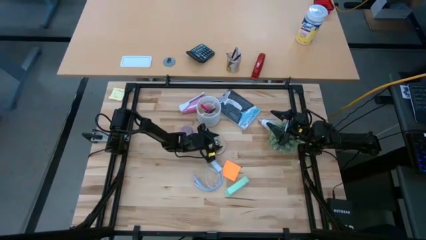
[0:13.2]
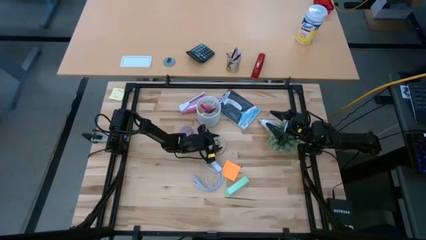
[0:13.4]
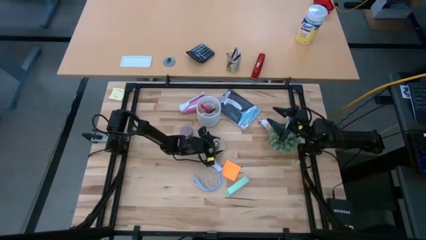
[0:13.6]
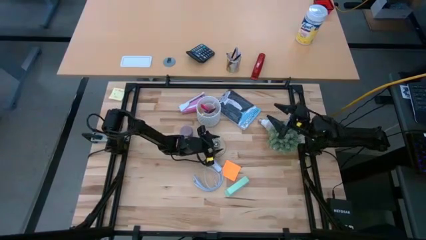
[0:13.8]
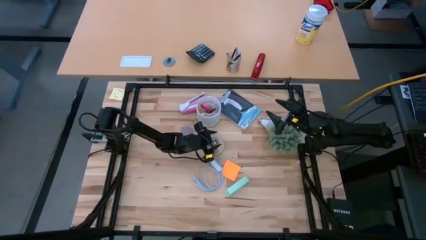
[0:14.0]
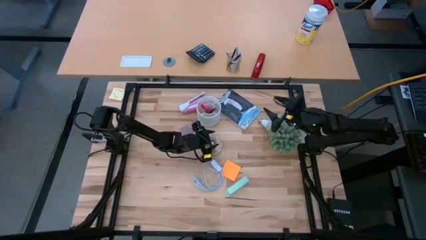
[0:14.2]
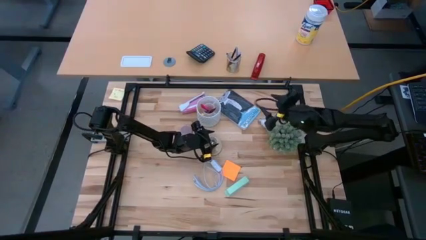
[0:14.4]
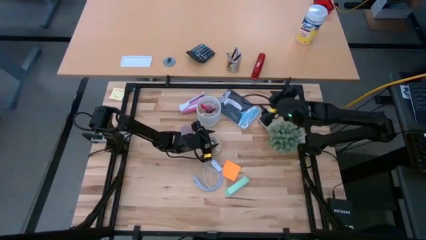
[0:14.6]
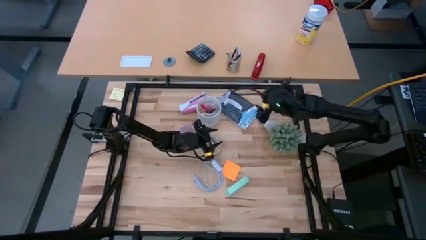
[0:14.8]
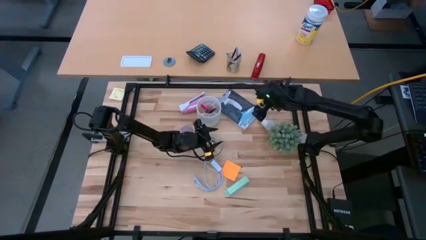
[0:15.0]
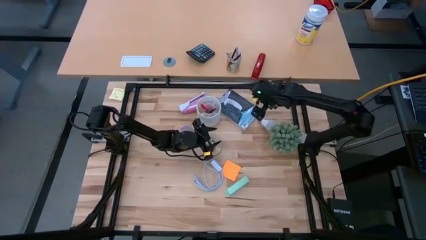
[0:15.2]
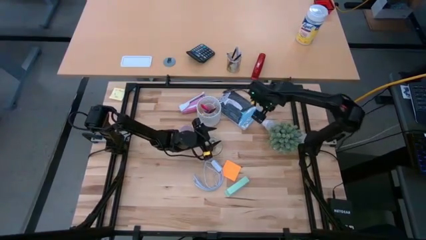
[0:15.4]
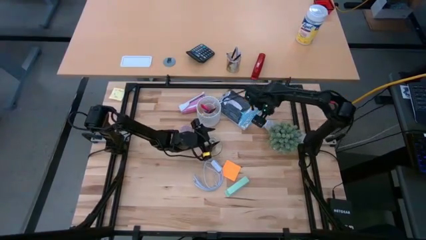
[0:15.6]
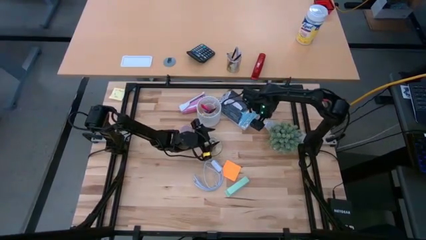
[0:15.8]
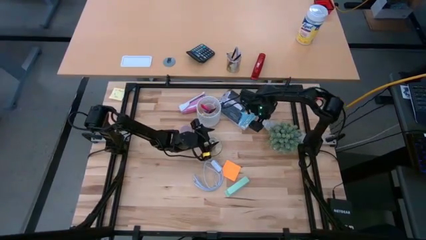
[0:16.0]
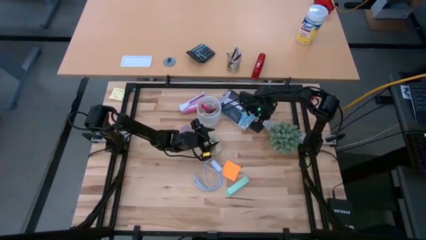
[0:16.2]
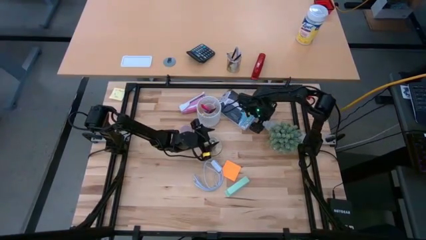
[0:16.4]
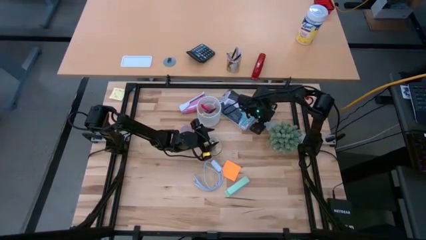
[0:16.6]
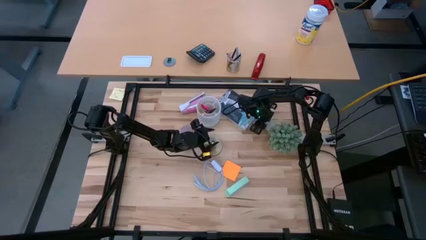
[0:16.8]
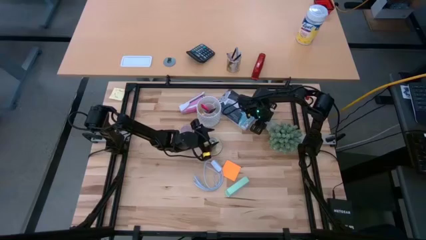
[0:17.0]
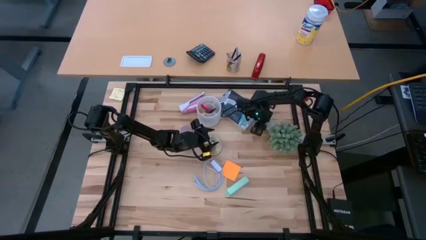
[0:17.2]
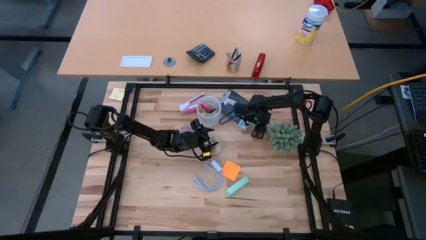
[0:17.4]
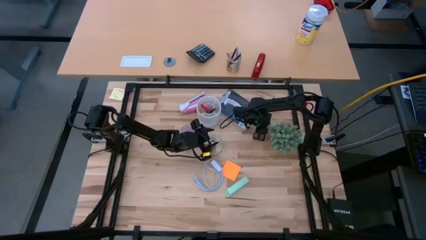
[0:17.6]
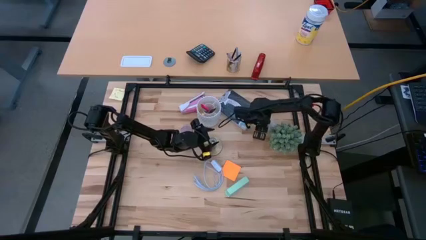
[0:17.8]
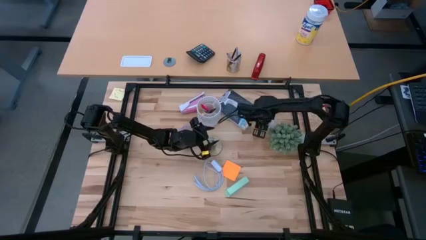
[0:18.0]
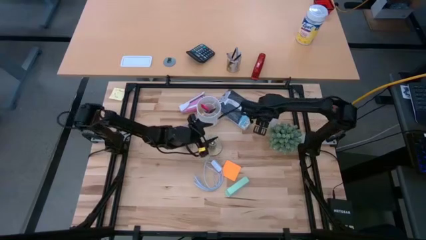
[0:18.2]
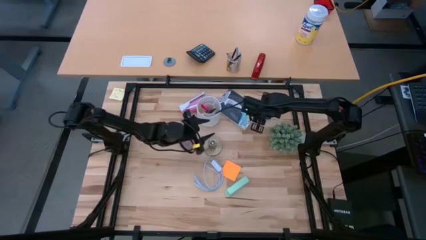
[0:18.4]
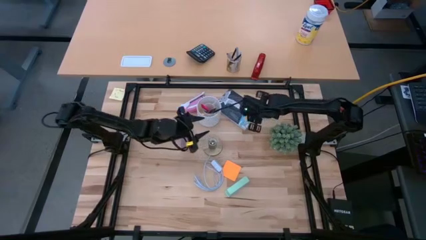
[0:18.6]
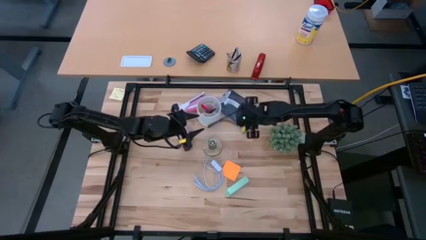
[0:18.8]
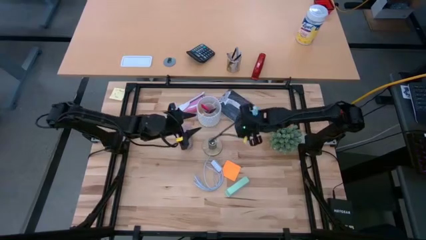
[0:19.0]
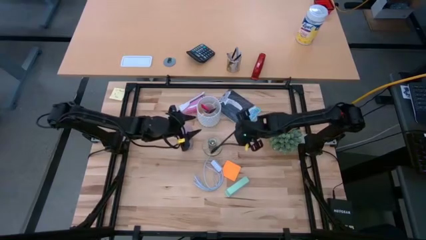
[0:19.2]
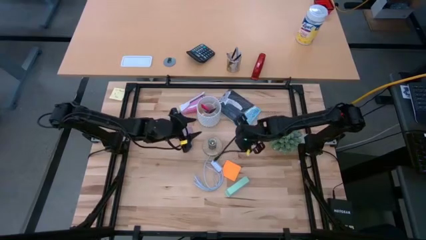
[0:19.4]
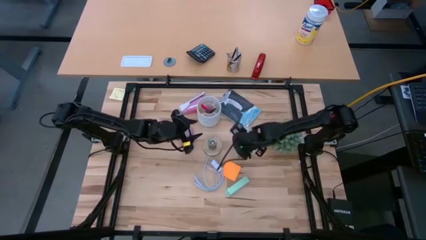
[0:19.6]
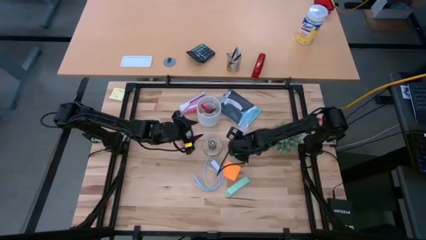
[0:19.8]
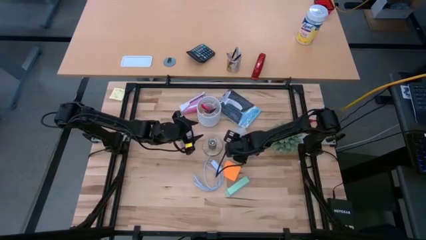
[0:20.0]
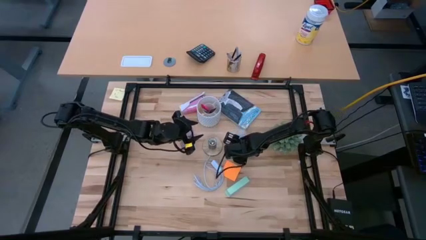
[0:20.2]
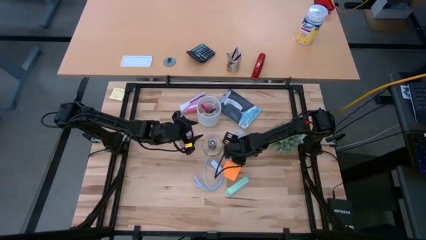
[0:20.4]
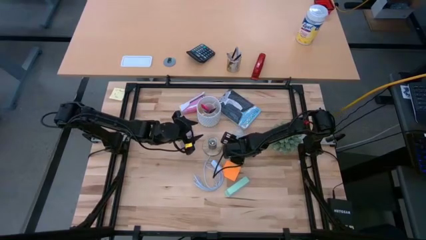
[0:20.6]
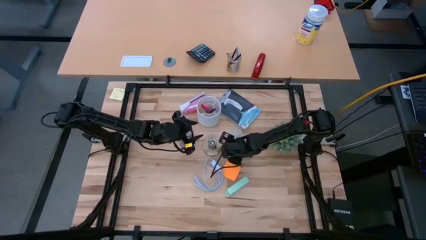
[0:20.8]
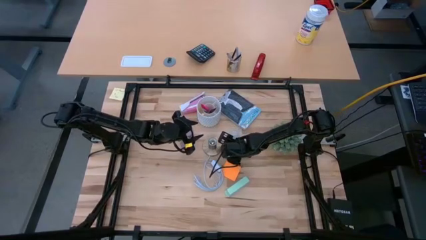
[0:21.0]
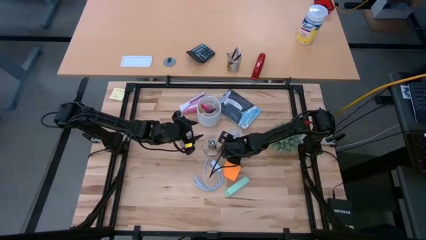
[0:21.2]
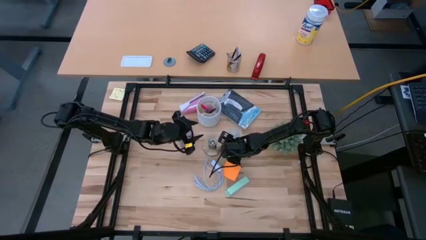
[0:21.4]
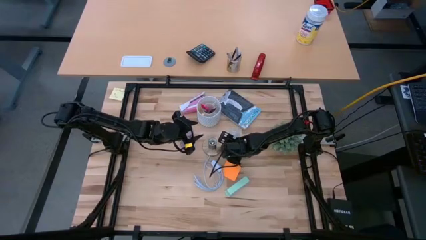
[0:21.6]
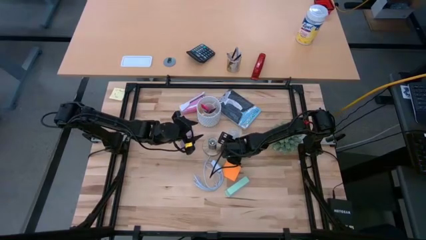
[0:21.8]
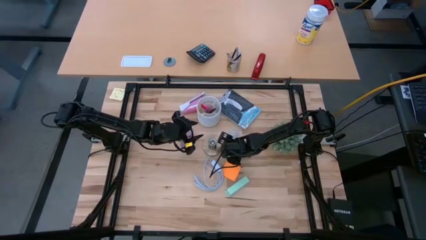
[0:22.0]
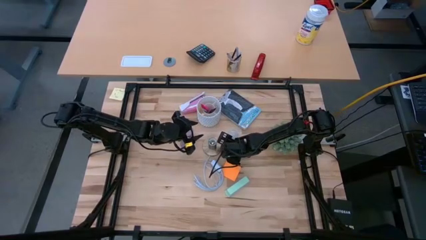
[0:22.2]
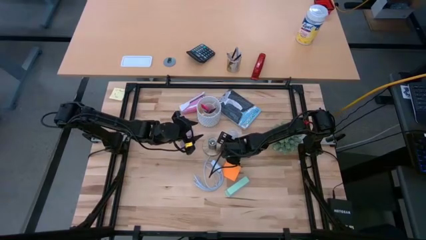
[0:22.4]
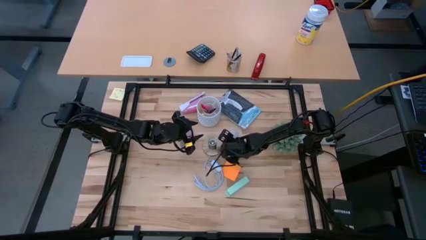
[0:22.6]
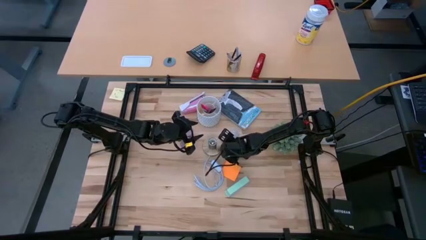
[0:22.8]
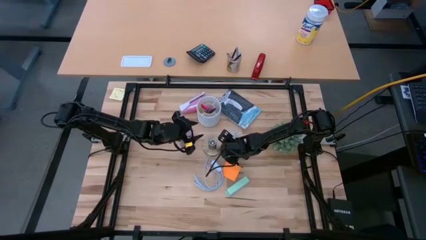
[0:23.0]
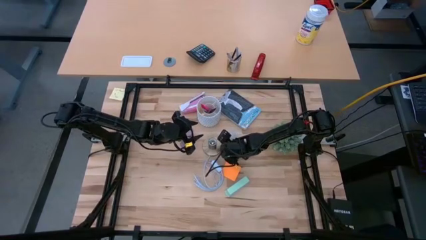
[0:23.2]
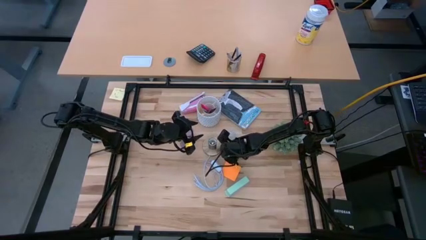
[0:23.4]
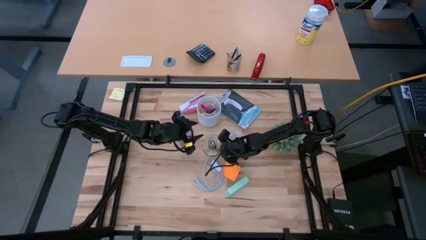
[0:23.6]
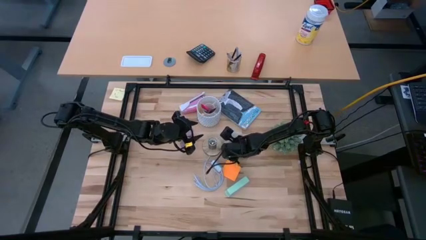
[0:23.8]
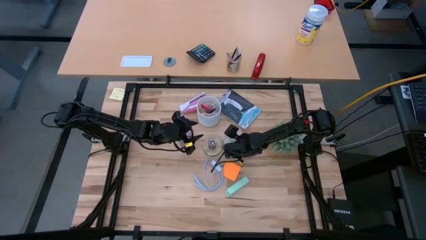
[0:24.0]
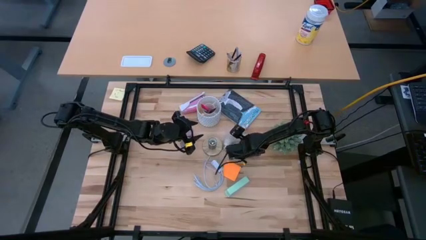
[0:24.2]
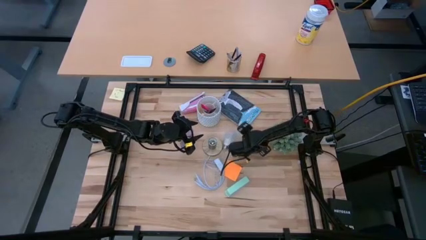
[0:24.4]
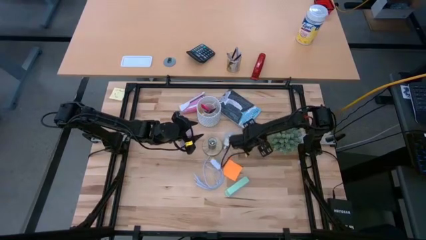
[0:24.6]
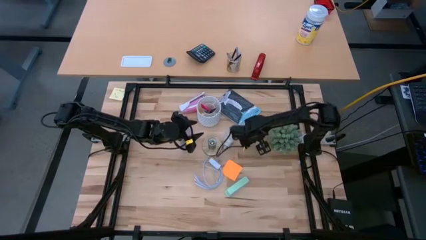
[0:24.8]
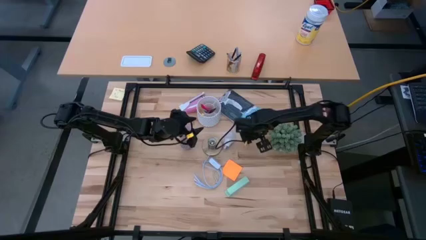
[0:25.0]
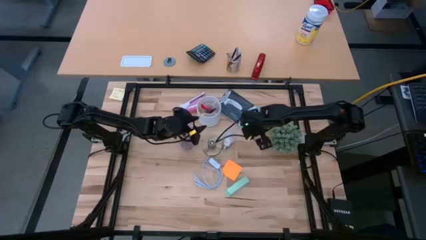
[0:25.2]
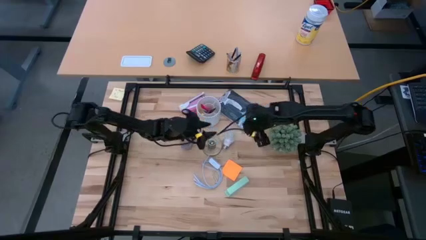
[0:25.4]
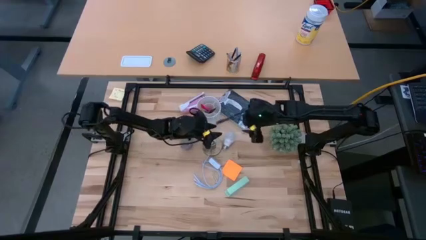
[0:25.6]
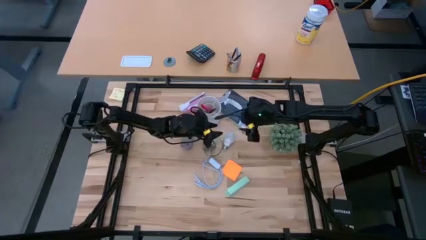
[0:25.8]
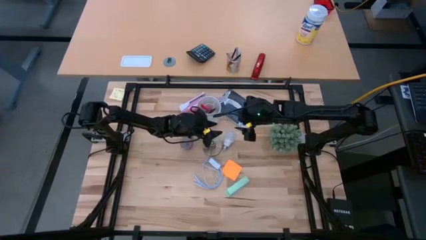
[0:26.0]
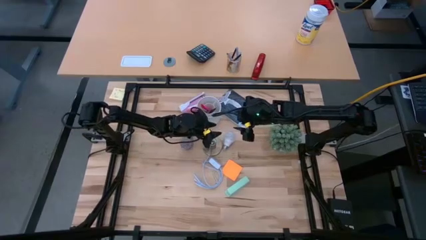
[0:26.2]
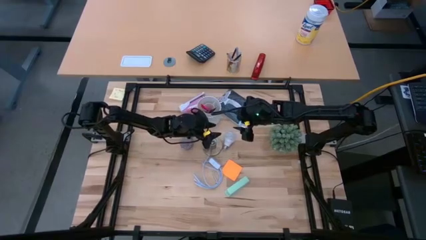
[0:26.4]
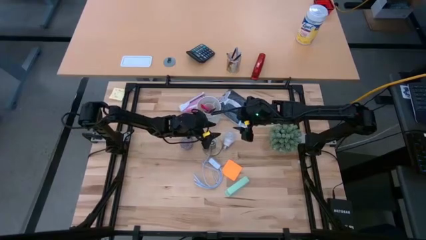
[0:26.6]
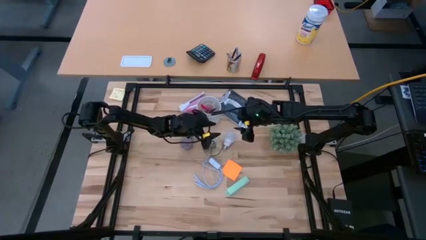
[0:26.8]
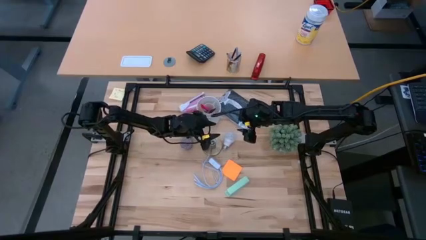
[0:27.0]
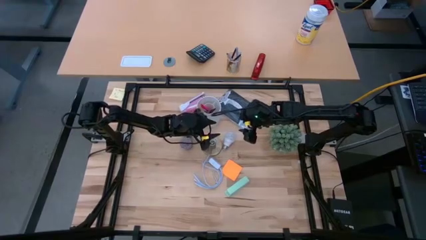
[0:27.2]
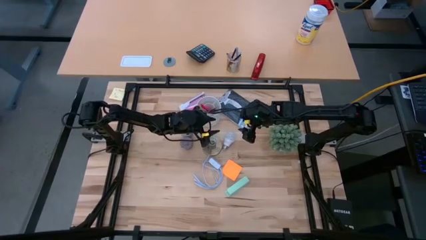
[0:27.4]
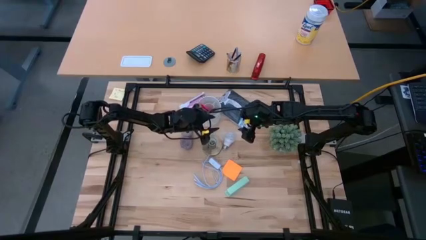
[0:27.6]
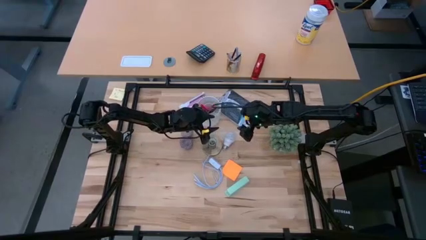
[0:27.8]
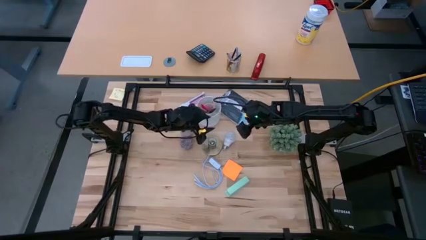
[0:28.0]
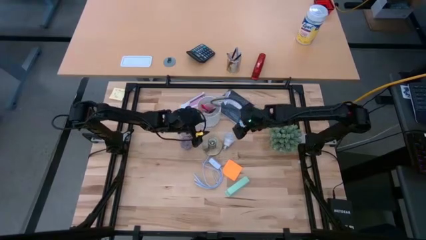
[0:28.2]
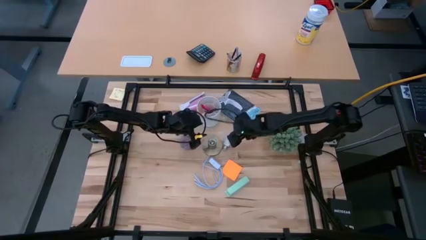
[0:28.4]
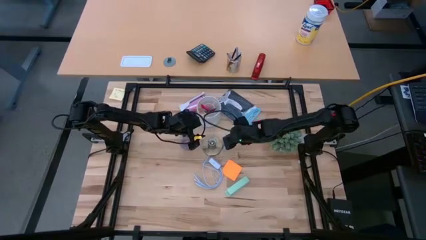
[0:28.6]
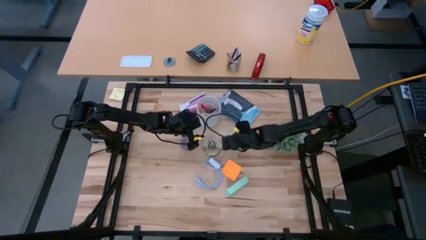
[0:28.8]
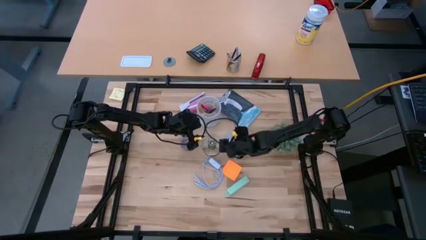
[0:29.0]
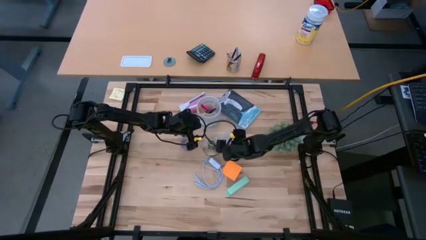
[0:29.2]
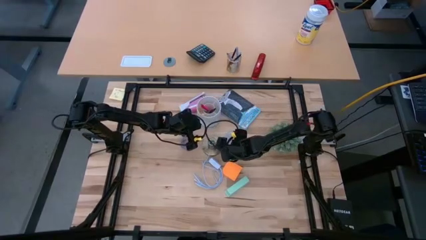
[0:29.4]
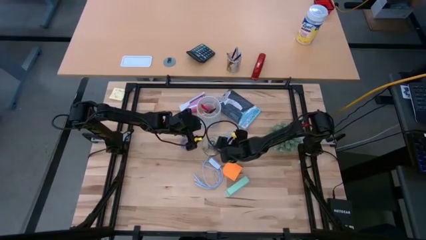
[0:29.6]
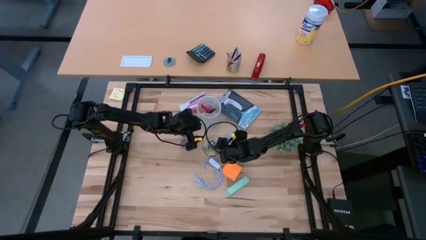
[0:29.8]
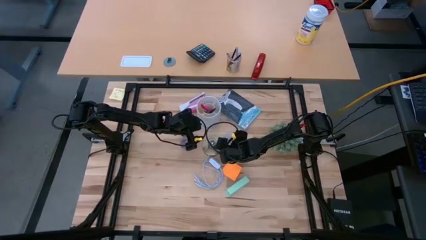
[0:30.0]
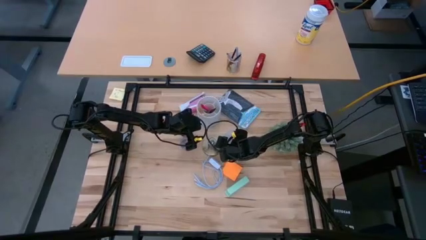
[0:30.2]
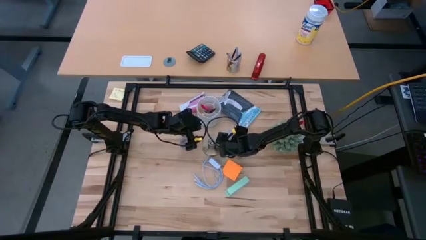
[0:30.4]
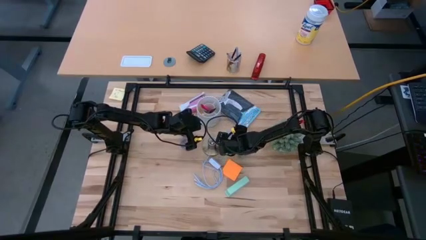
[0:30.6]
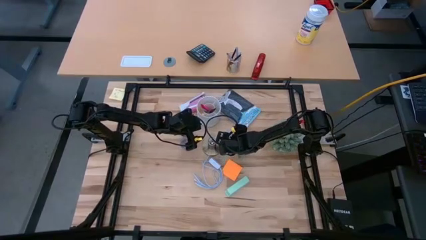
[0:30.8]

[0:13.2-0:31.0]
Task: Screw lightbulb
Insert the lightbulb into the lamp
